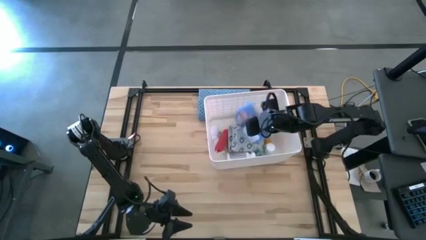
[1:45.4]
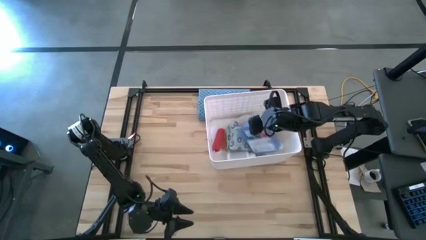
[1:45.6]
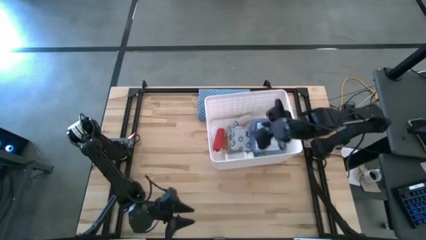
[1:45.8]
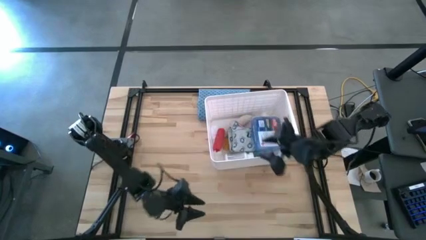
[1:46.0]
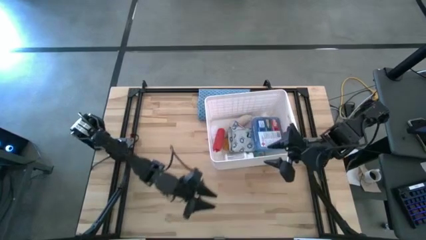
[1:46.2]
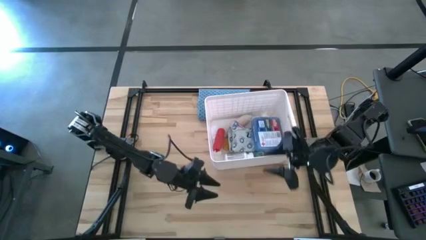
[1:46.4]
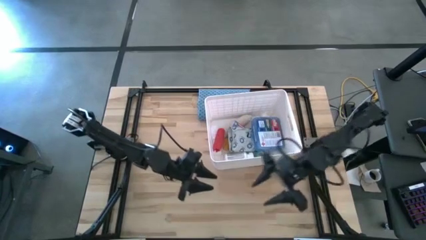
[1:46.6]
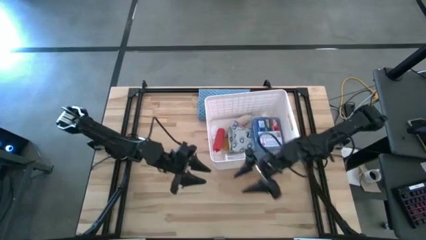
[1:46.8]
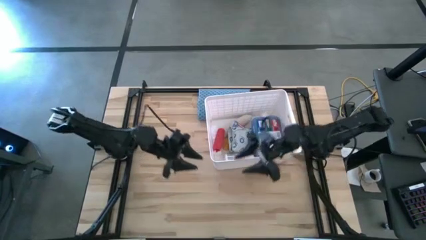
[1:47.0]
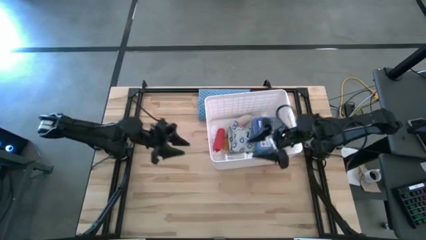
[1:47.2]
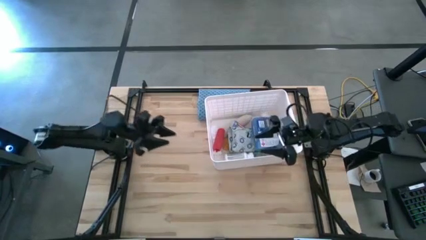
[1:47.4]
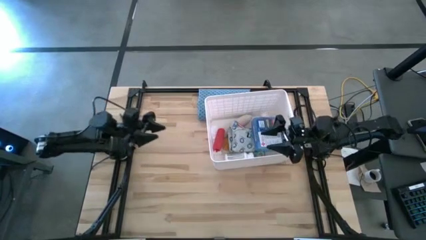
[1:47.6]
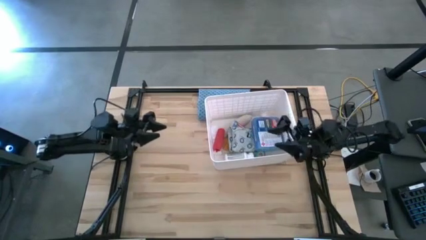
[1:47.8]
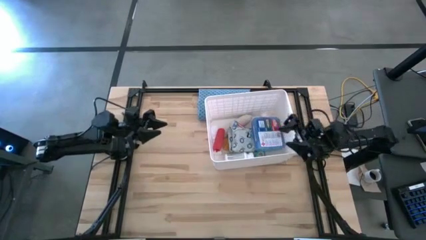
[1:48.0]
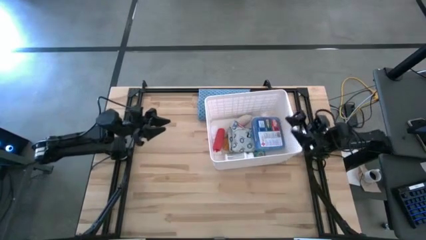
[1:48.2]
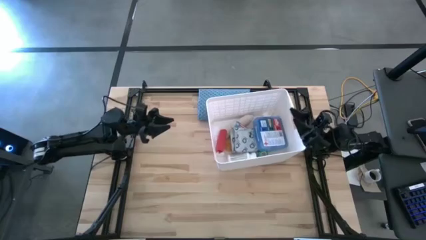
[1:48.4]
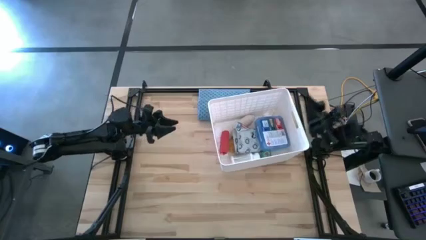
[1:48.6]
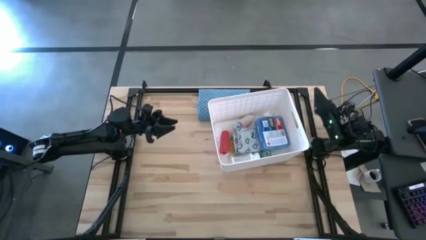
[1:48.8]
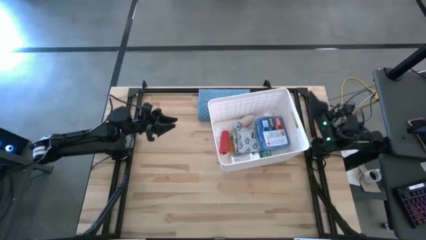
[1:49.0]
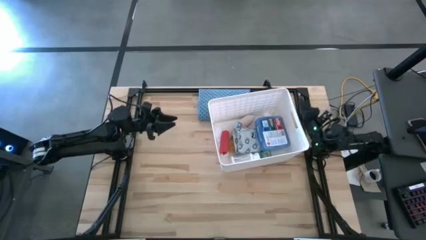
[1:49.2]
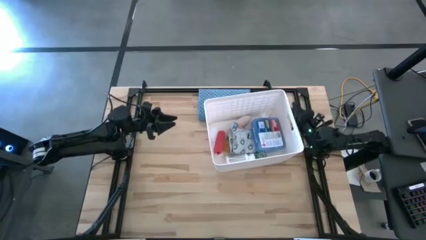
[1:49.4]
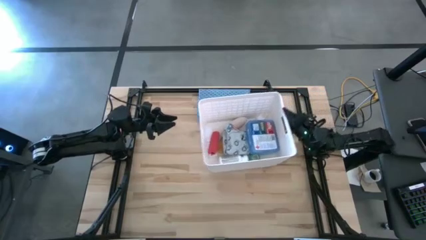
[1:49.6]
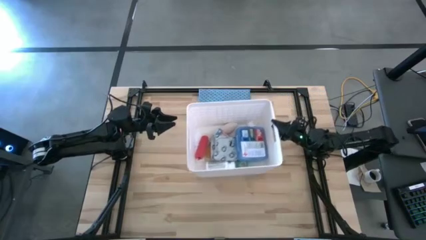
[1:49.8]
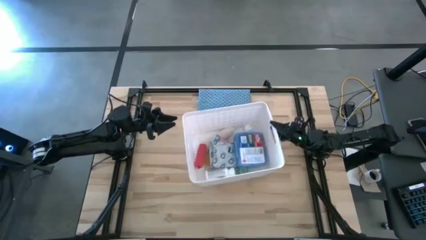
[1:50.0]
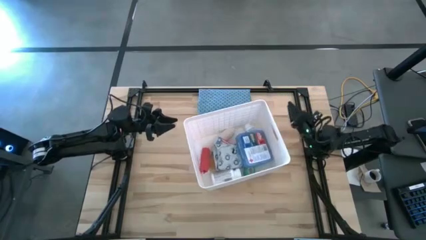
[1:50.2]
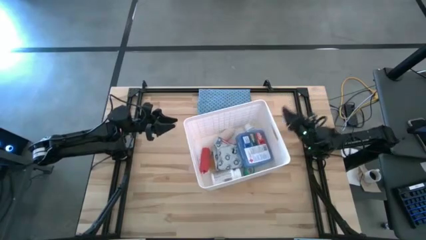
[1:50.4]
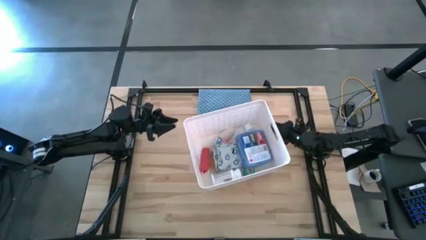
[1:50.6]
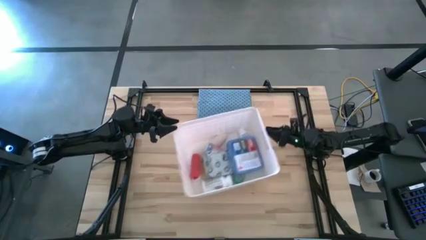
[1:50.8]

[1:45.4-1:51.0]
Task: Pick & place medical supplies in basket/bin
Move the white bin to the center of the table

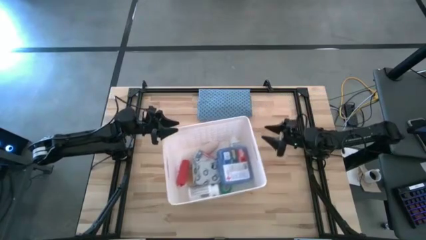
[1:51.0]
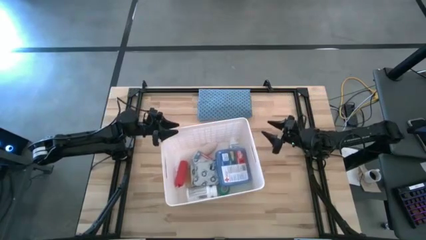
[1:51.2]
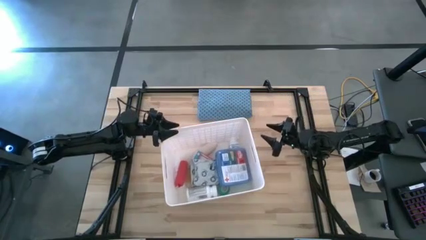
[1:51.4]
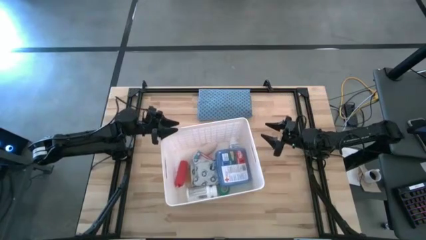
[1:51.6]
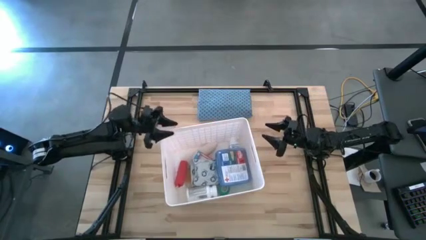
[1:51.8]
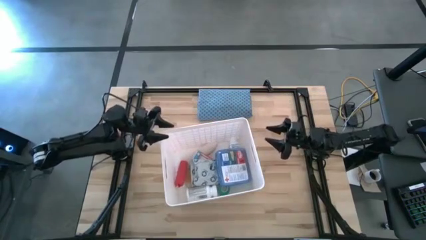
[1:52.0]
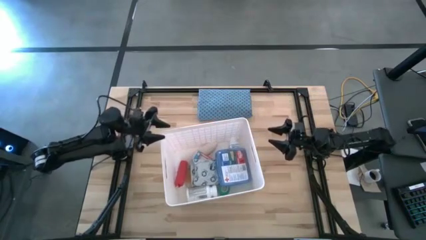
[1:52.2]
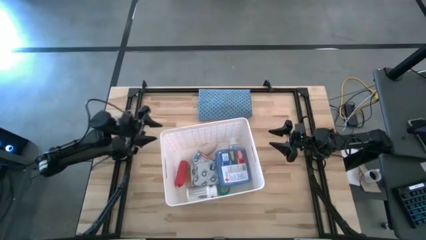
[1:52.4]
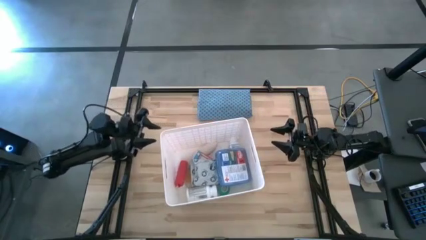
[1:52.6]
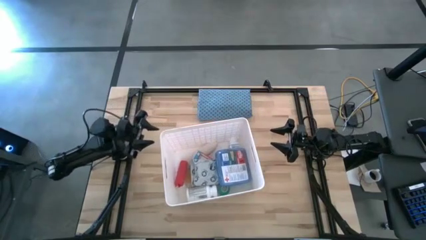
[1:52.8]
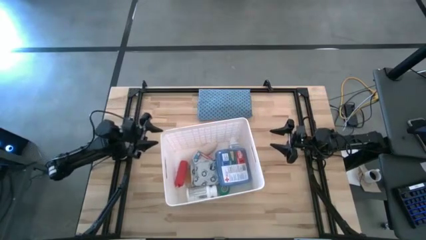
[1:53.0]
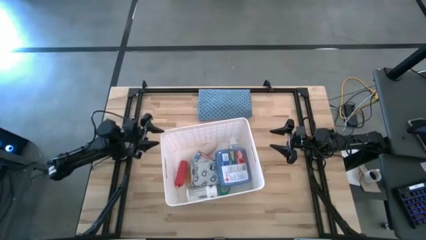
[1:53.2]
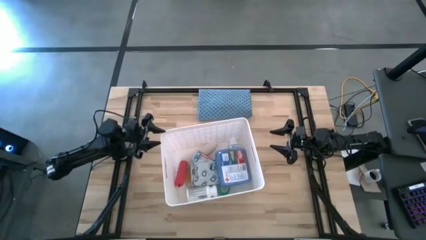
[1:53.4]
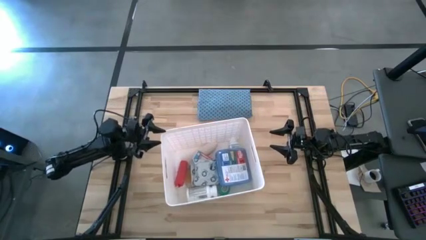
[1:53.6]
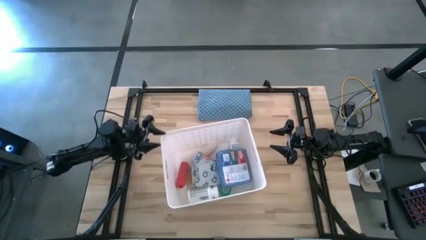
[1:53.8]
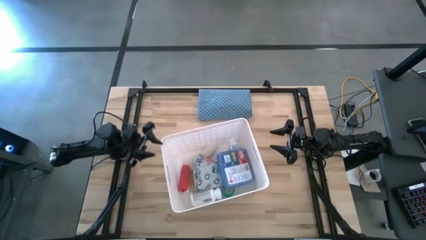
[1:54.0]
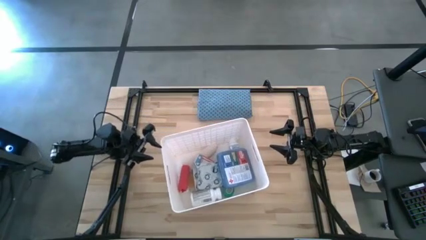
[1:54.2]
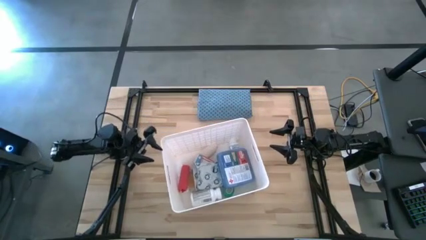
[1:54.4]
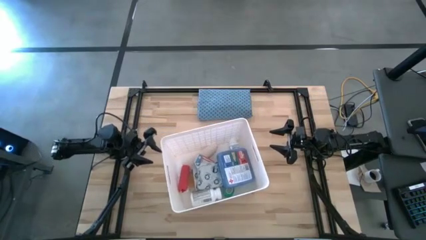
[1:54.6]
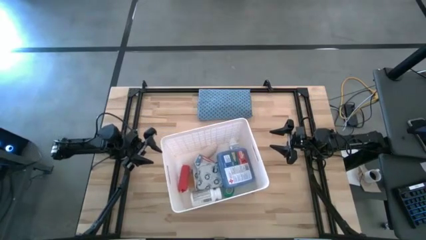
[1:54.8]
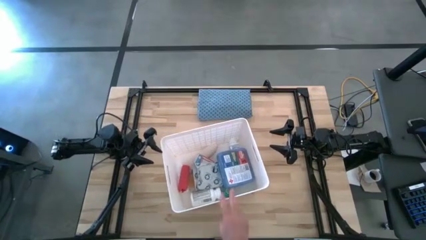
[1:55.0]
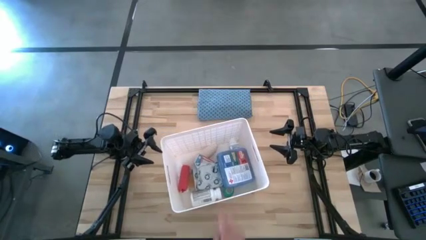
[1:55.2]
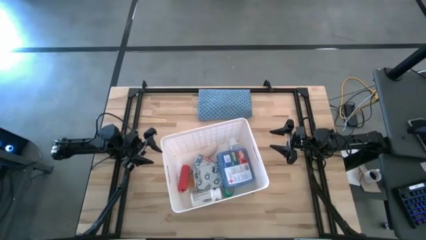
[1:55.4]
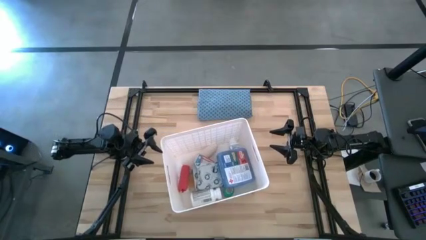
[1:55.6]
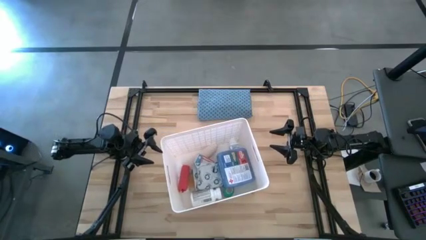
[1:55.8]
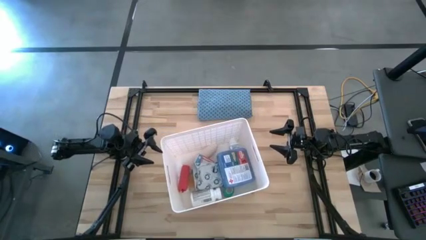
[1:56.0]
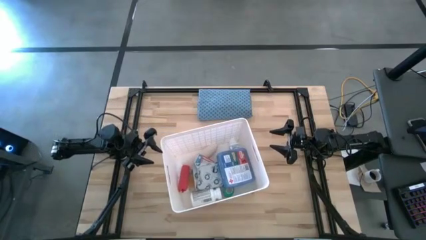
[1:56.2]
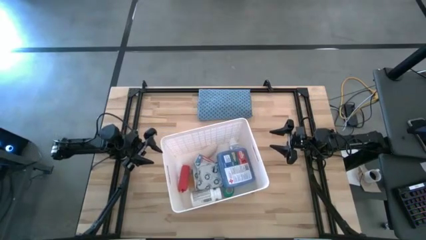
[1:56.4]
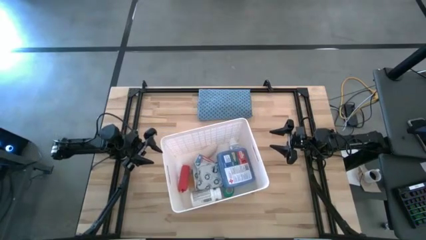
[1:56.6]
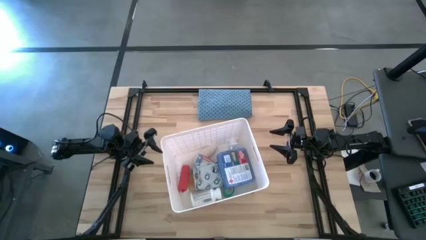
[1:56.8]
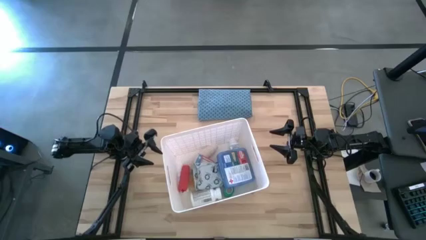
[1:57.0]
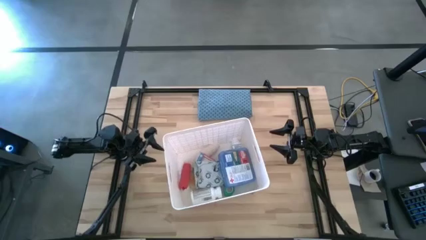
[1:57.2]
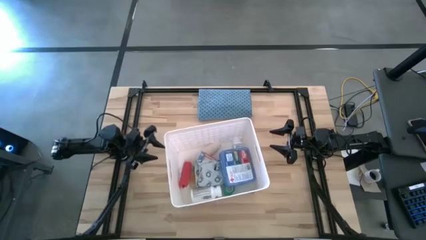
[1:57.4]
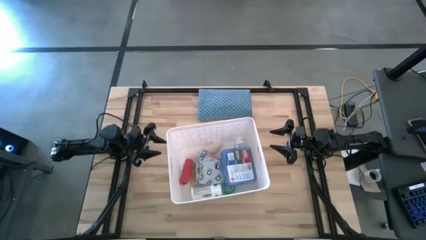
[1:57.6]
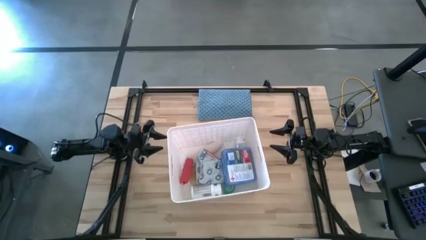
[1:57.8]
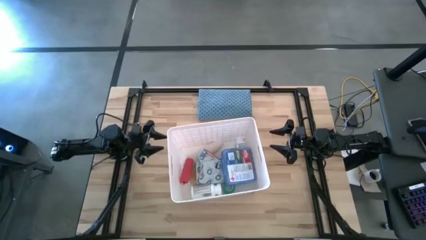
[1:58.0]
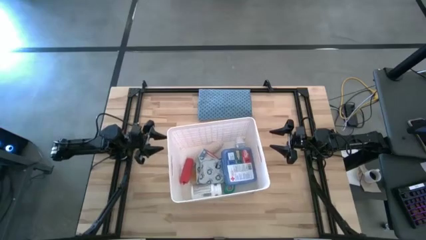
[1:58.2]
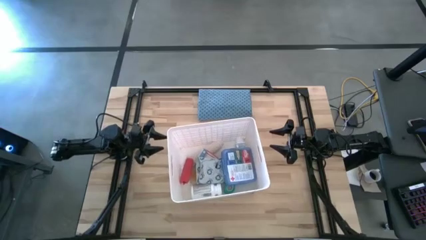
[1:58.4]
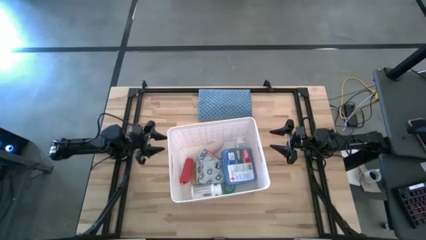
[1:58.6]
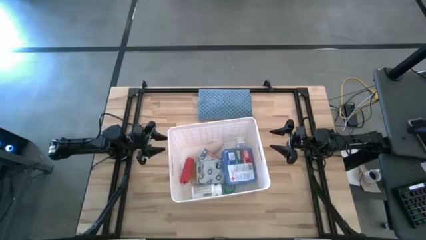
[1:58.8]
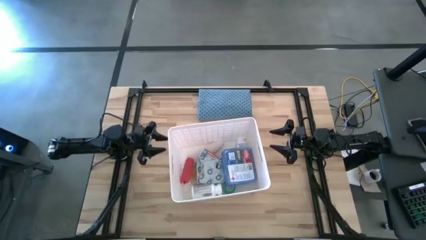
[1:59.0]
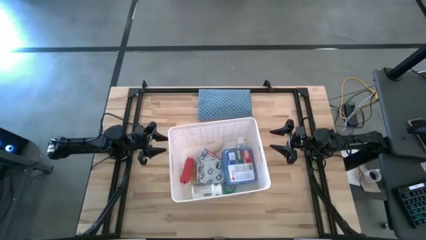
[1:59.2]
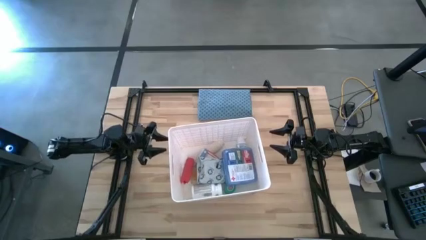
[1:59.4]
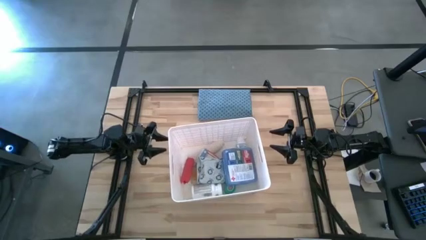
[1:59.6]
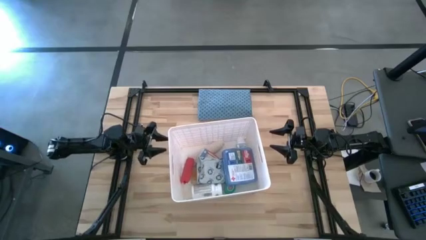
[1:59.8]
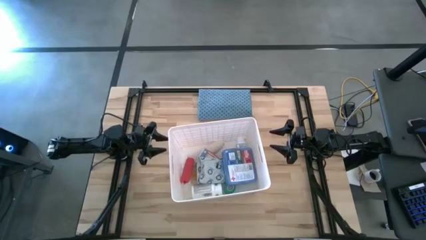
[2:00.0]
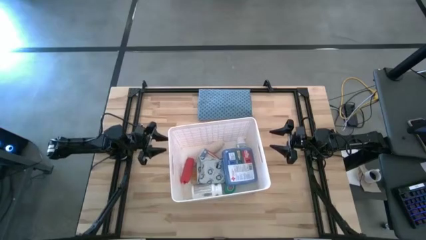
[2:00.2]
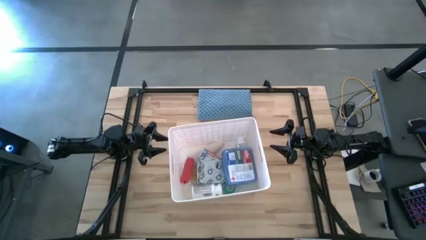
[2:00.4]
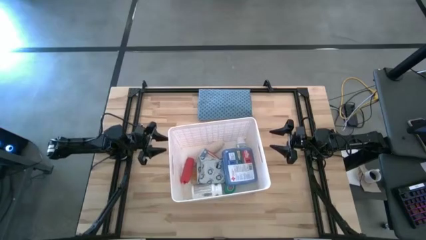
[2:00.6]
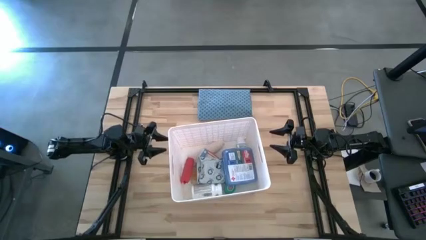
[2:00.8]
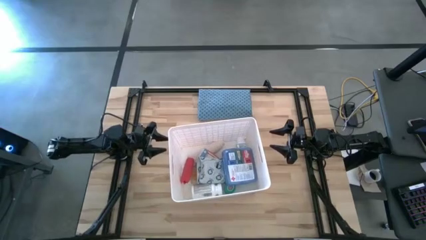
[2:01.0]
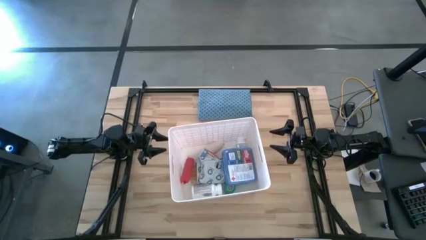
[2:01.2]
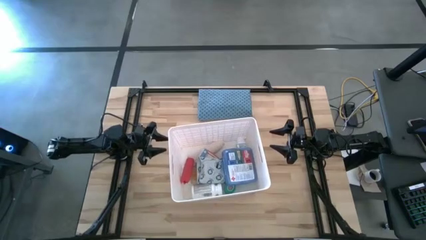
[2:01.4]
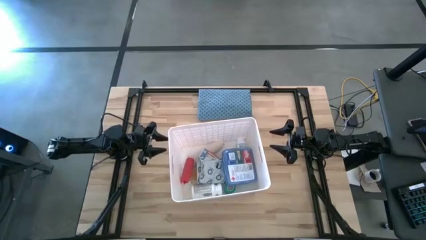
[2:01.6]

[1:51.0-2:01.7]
Return to Home Position

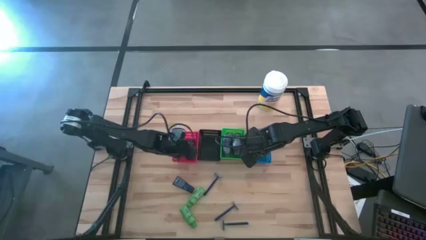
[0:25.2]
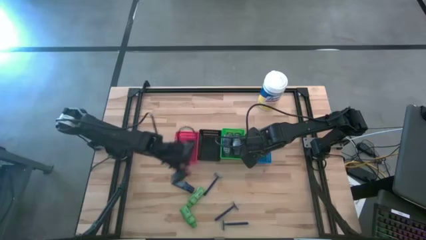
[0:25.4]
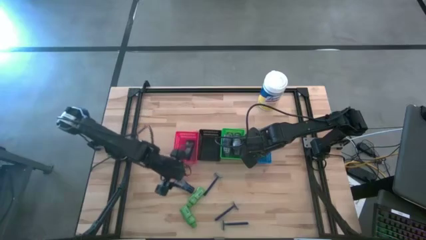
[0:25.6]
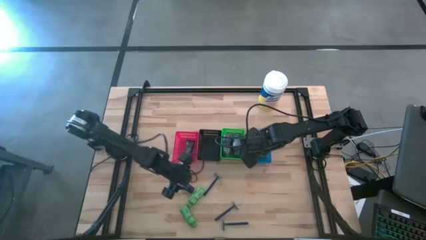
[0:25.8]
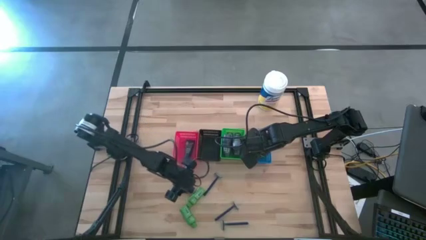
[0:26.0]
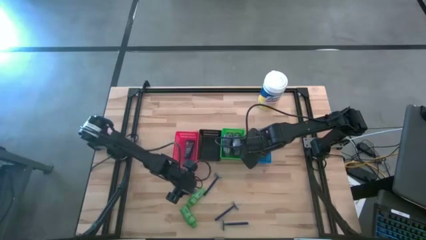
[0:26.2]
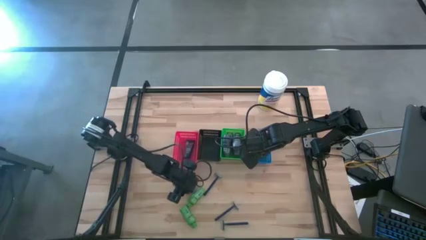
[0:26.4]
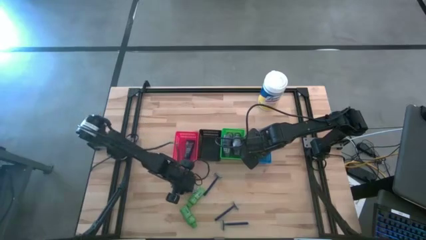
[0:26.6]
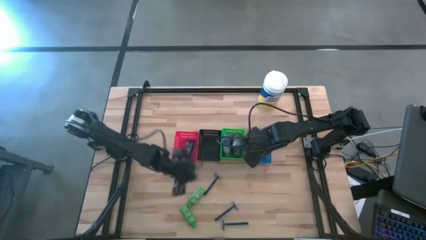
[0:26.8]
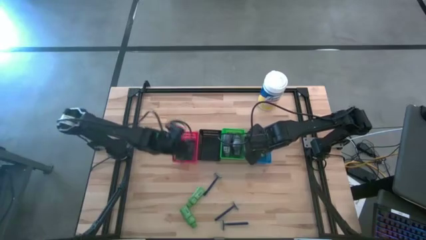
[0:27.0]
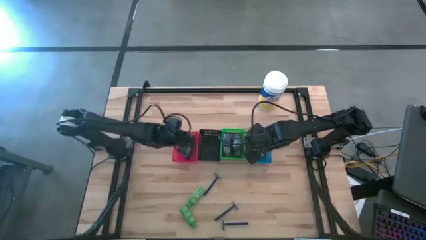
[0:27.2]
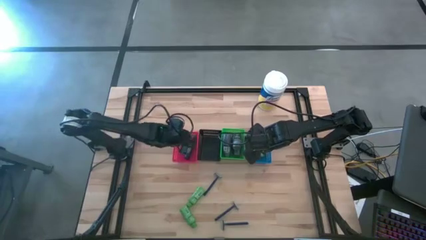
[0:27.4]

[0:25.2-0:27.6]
Task: Pick & Place Travel size toiletries
Put the blue shave cream into the red basket
